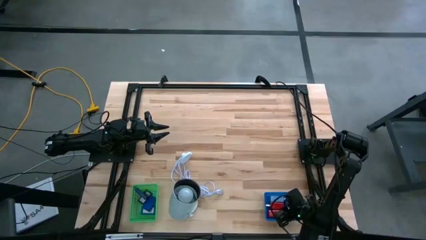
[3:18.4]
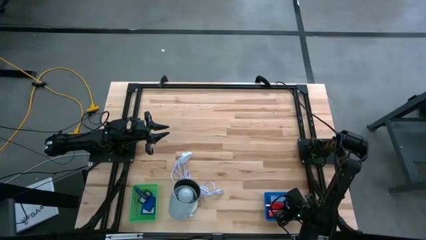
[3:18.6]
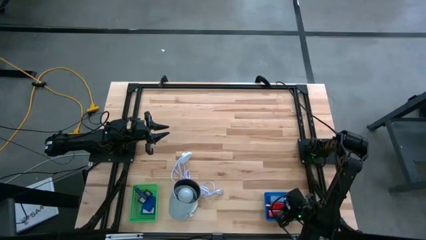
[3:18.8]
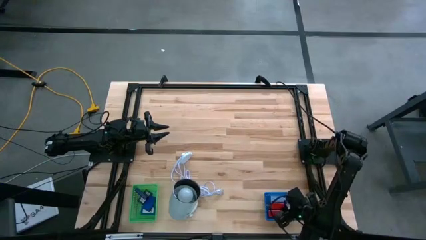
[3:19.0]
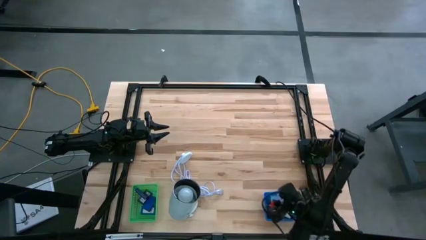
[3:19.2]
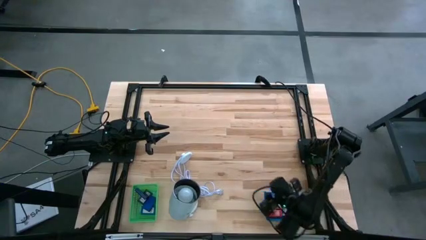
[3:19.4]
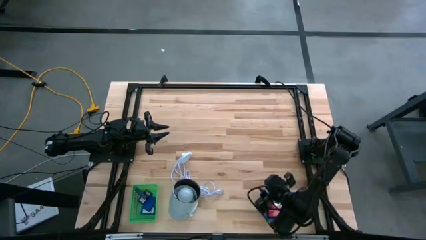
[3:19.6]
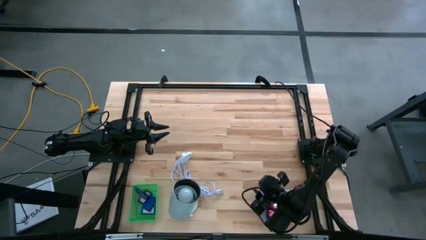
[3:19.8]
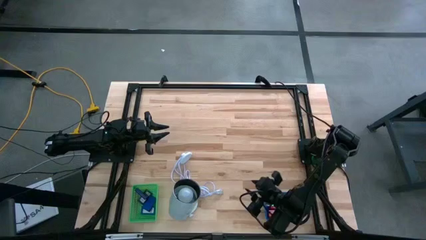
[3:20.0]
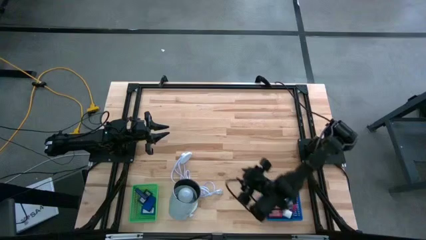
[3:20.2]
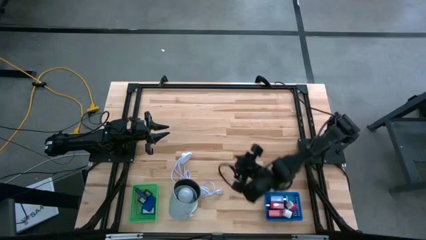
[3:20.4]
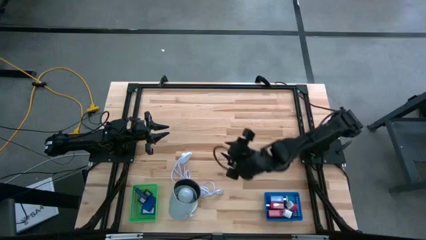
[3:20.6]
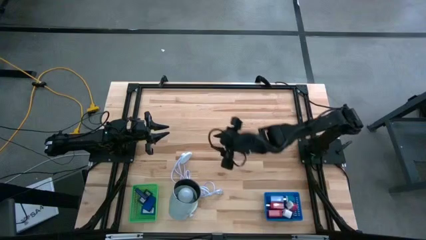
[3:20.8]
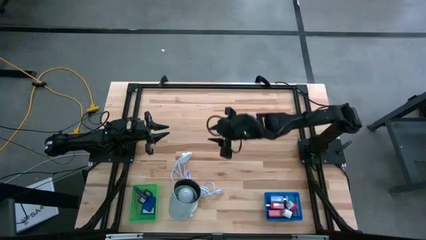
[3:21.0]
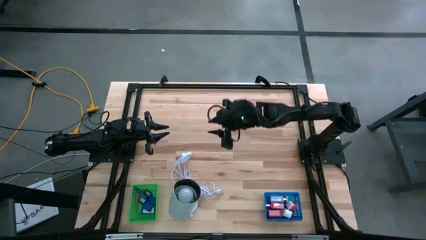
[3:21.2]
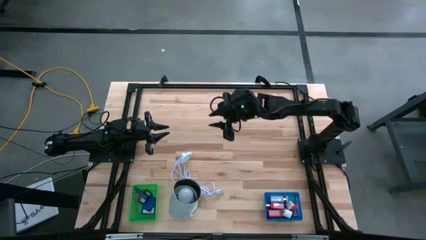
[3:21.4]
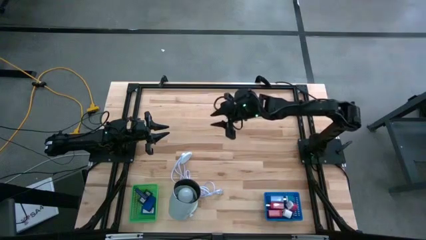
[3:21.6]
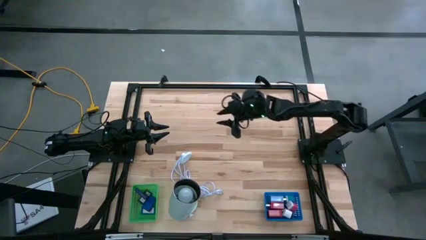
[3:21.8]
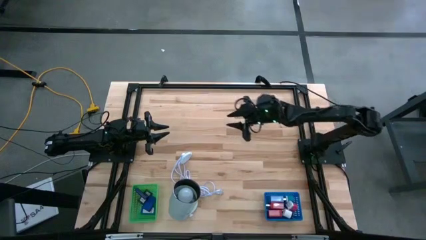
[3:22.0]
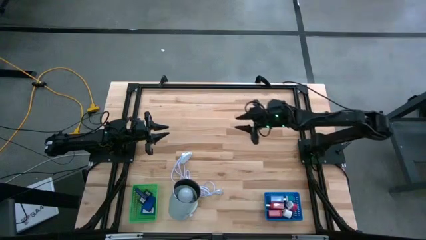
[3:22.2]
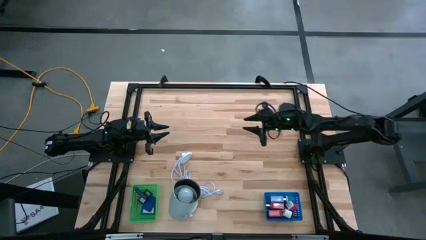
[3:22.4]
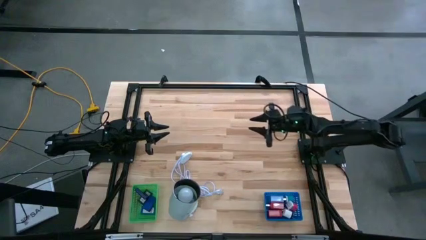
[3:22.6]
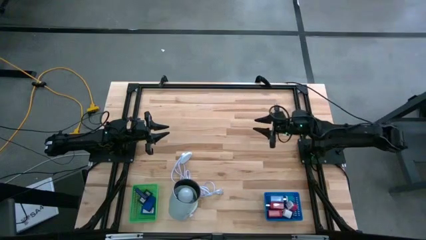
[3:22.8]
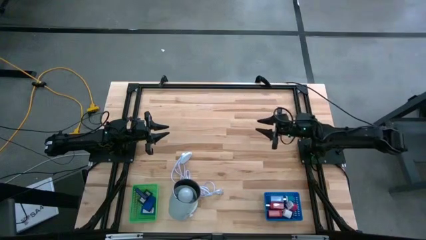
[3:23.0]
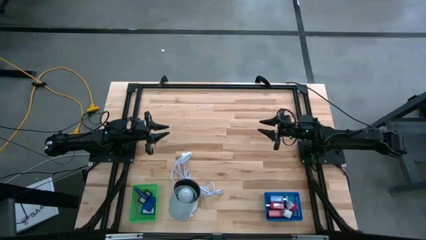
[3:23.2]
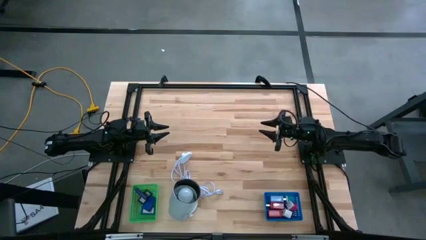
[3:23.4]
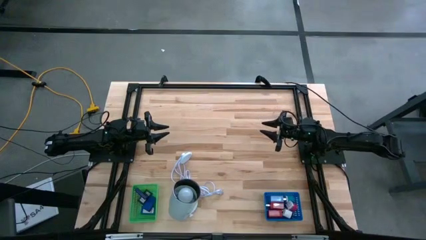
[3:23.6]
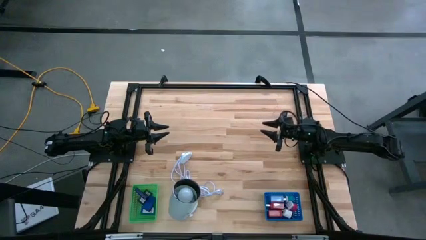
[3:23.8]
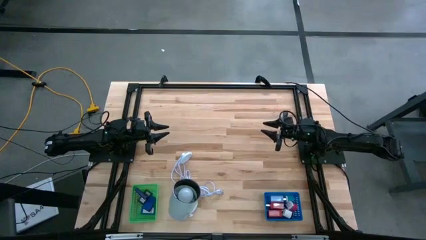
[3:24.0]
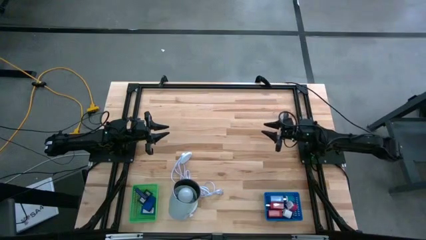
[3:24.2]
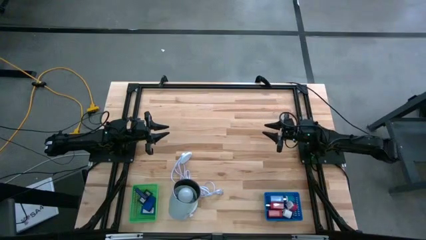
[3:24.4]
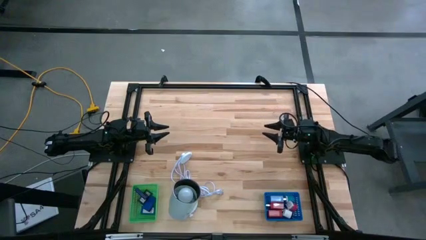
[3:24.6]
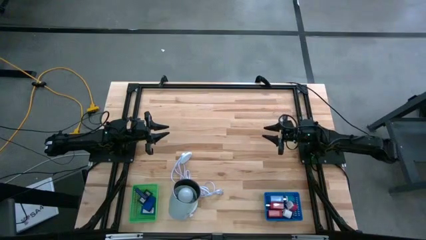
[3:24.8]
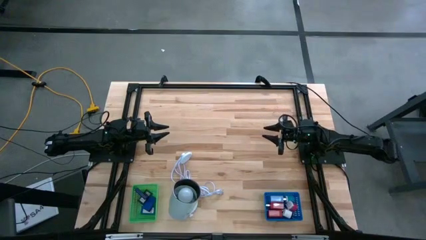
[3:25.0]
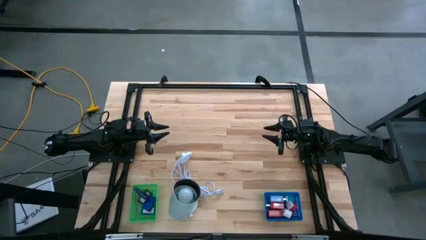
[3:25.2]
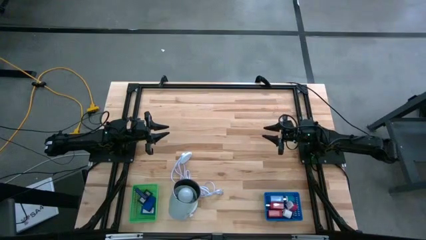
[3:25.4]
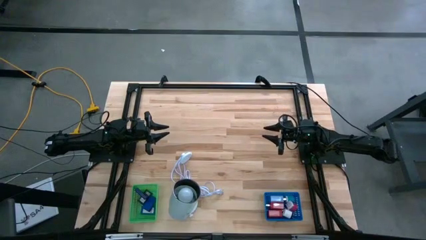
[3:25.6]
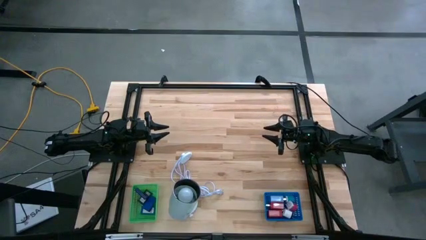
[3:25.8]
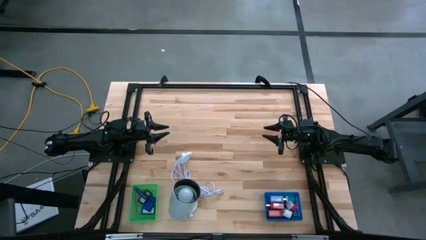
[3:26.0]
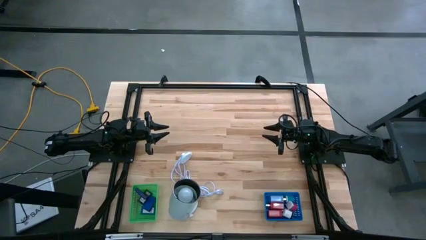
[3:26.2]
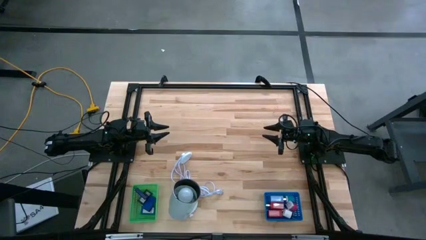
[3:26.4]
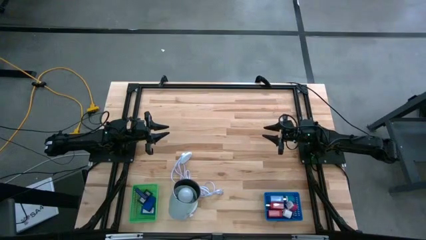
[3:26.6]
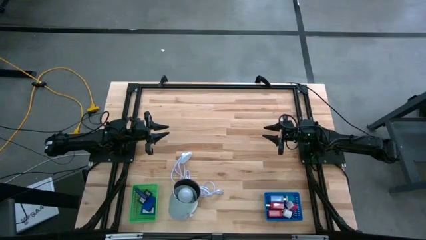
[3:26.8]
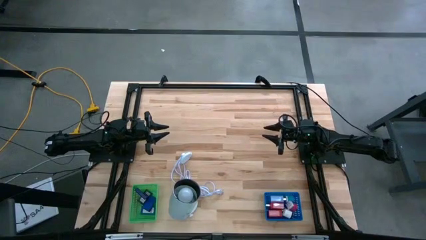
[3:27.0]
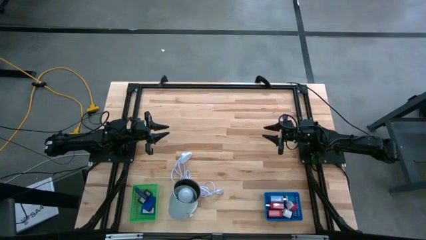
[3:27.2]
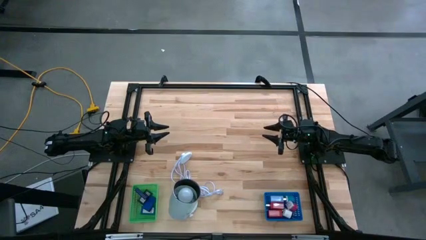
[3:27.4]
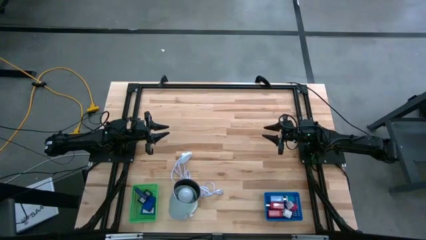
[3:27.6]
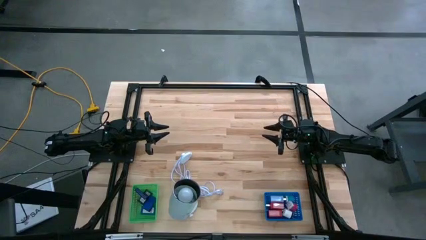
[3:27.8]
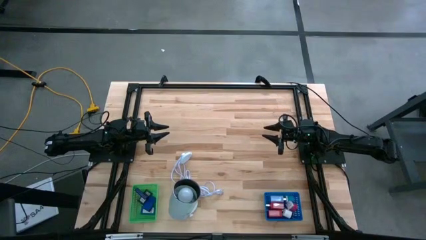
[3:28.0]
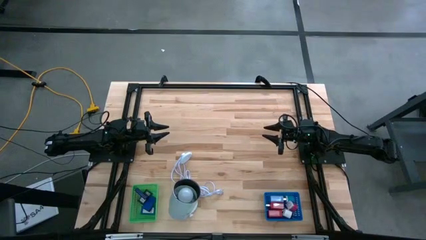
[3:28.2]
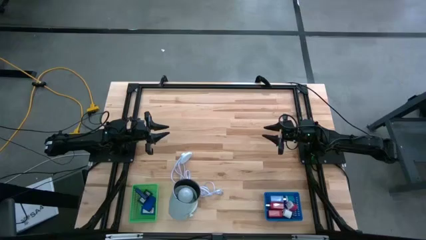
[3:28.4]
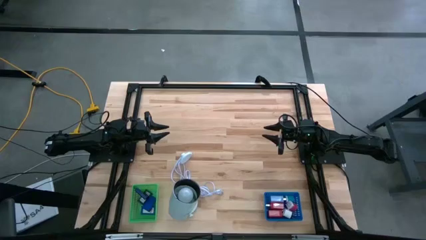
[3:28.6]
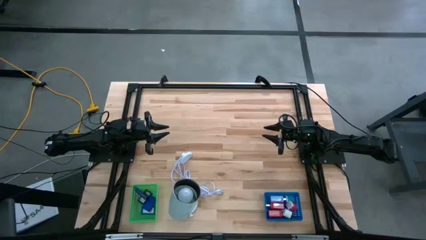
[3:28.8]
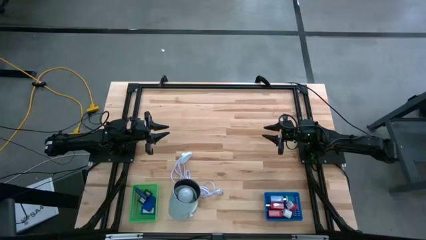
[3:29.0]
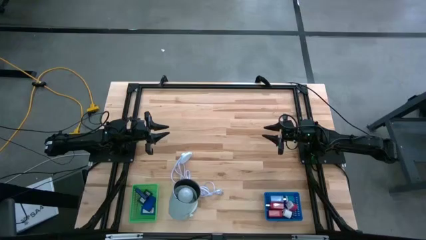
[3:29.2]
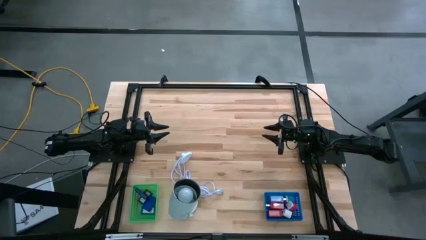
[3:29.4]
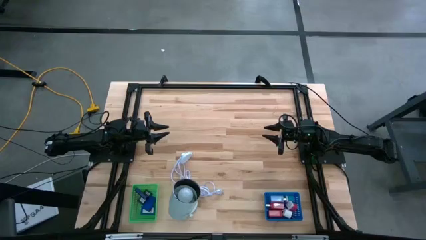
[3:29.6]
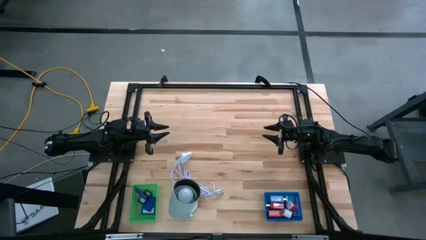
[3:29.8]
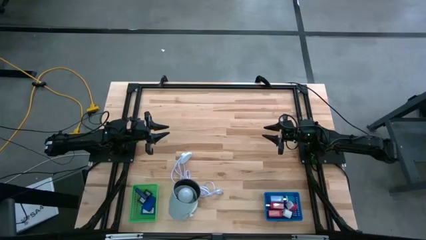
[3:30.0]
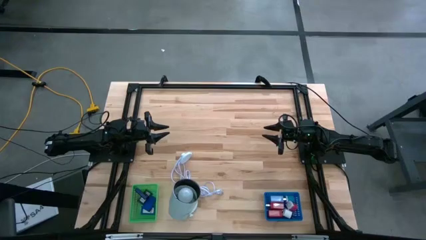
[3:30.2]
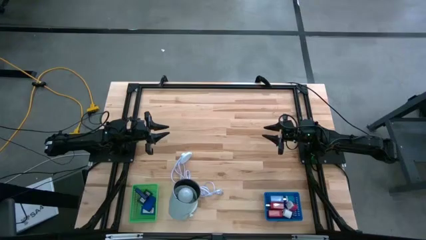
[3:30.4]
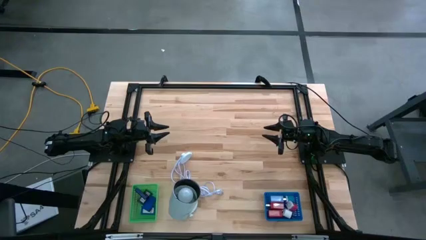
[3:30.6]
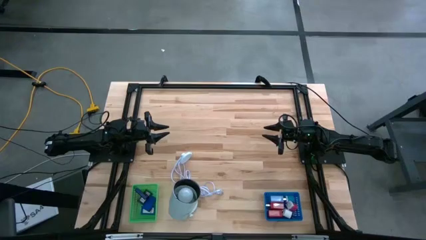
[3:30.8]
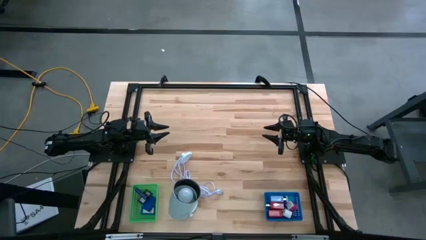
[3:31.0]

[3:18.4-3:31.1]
Task: Pick & Place Office items
Return to Home Position

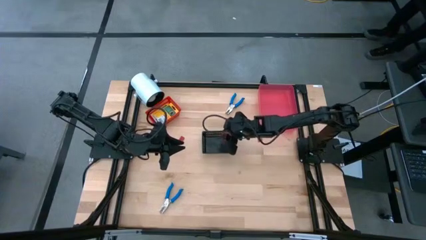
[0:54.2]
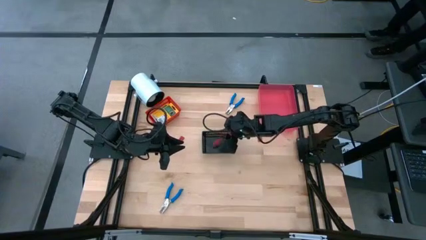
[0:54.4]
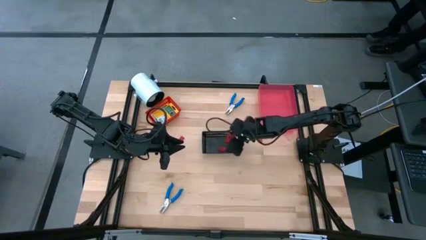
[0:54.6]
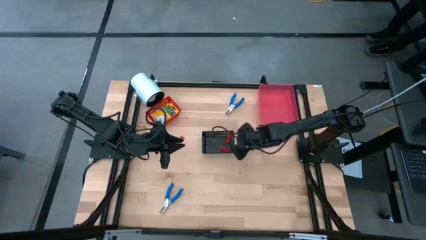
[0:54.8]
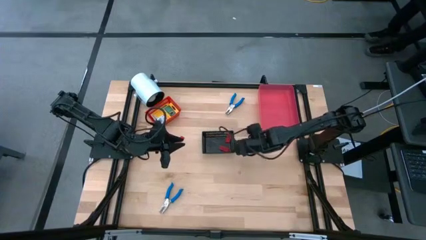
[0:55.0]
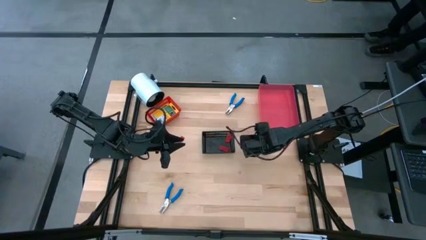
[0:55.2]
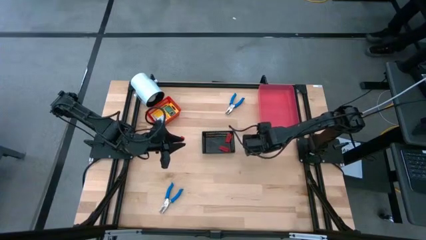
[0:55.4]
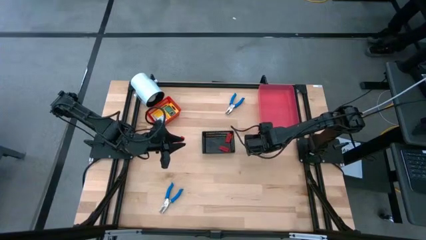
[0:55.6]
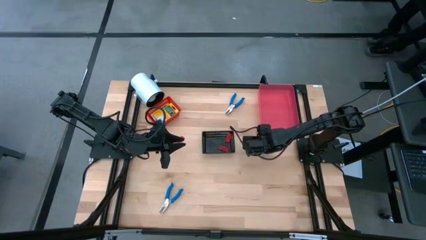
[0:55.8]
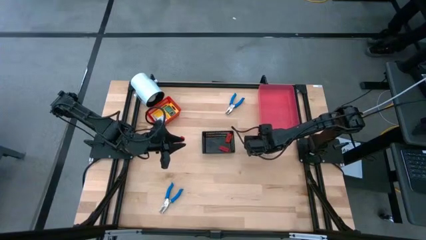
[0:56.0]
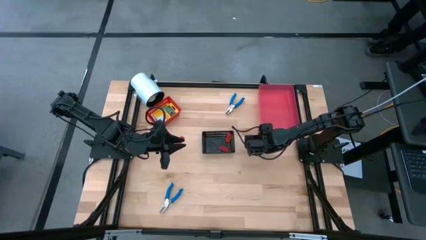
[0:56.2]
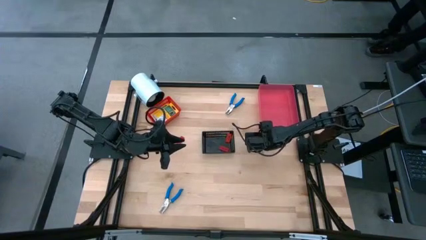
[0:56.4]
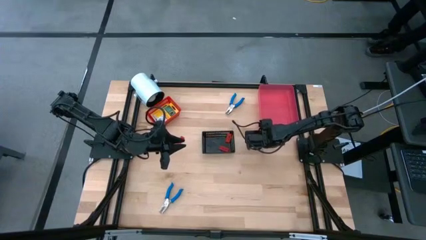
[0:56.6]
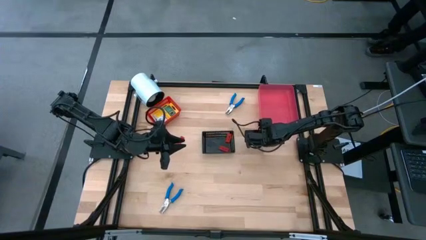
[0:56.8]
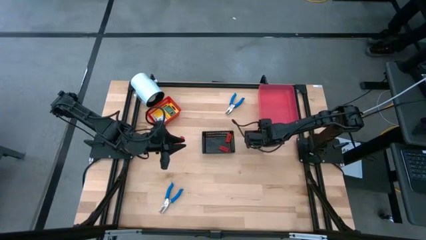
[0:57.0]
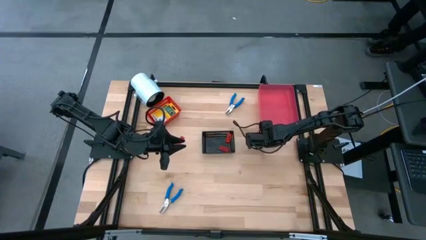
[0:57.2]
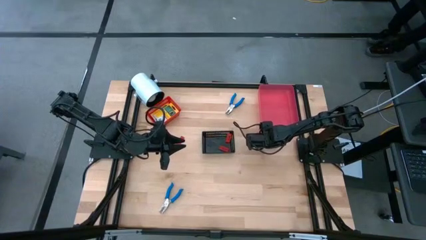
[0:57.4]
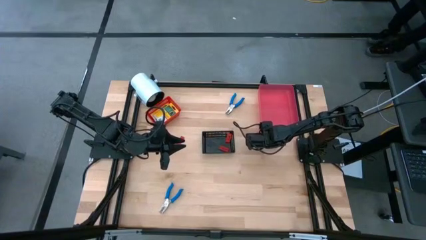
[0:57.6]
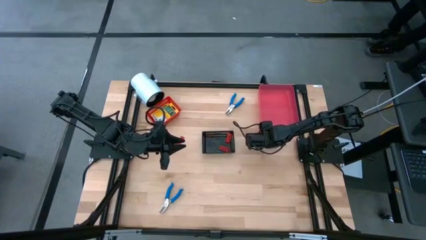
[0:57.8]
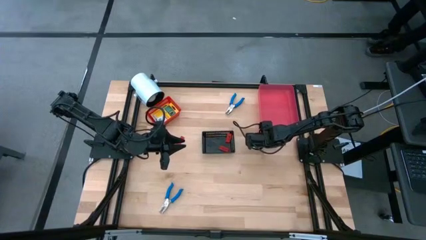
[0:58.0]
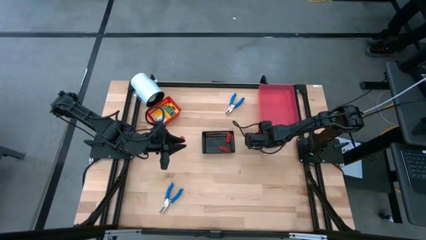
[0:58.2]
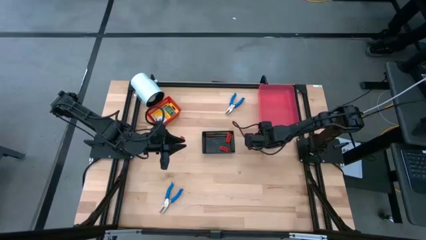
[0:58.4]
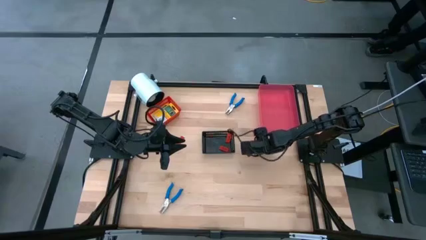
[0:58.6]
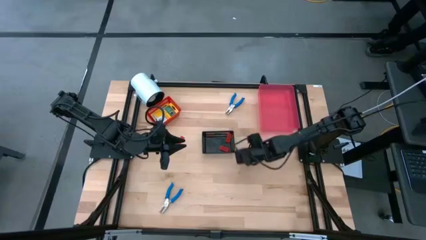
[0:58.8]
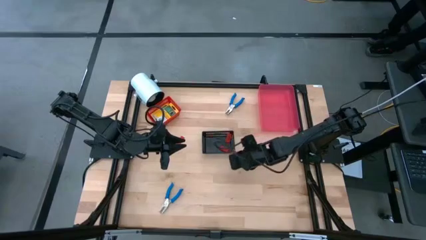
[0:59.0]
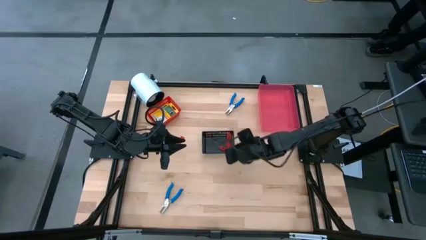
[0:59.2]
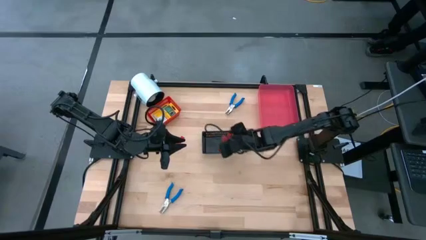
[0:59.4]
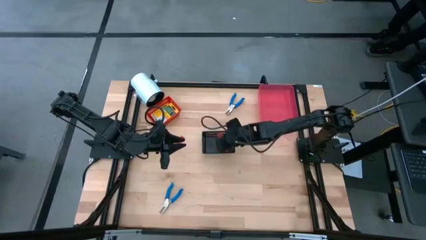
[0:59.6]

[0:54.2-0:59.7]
Task: Pick & Place School Supplies
Put the red eraser into the black bin
